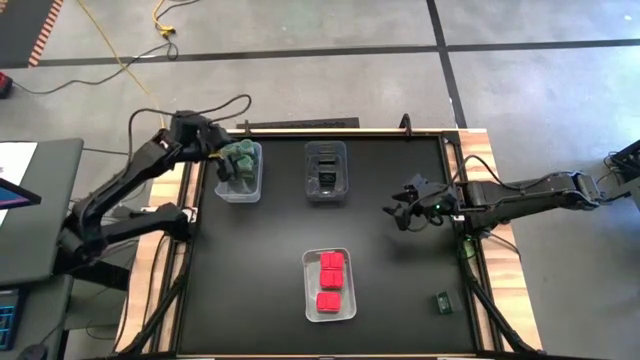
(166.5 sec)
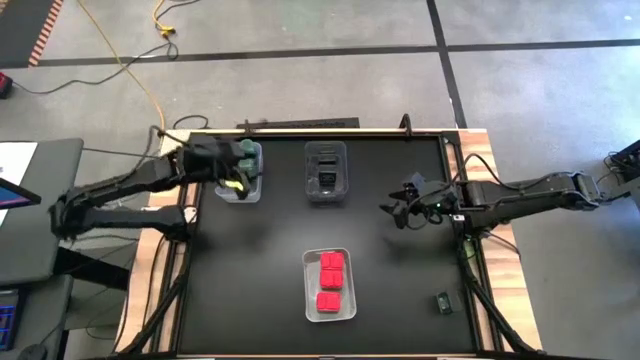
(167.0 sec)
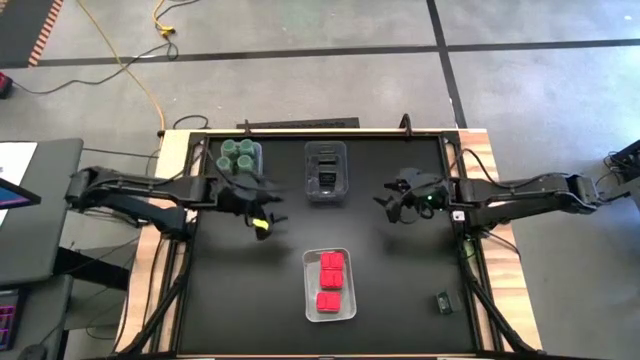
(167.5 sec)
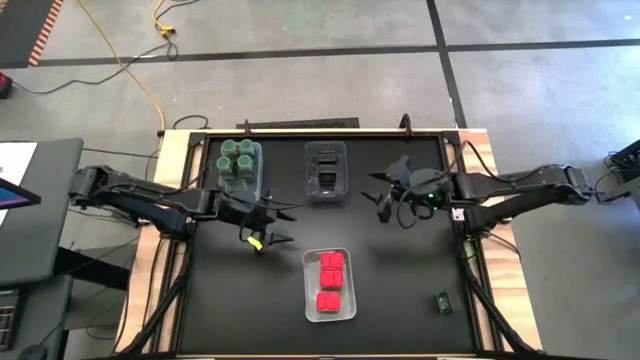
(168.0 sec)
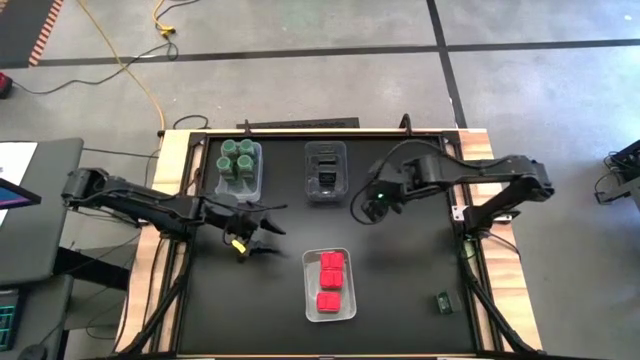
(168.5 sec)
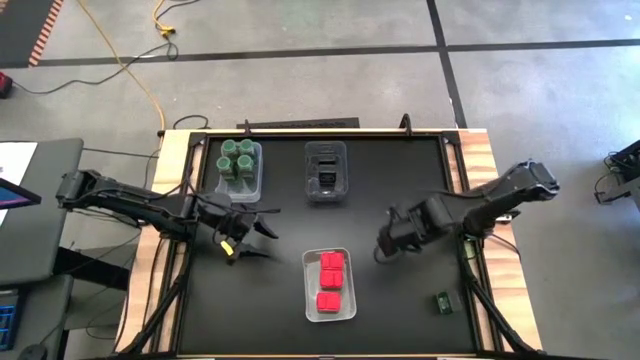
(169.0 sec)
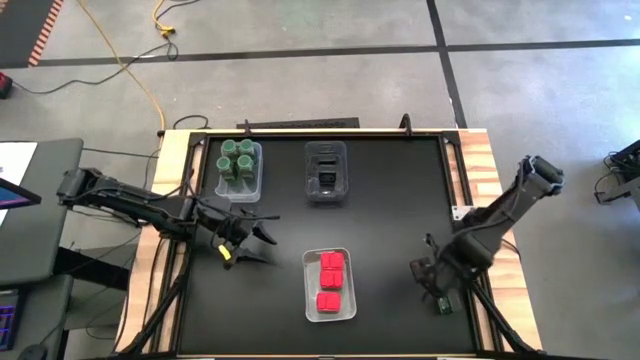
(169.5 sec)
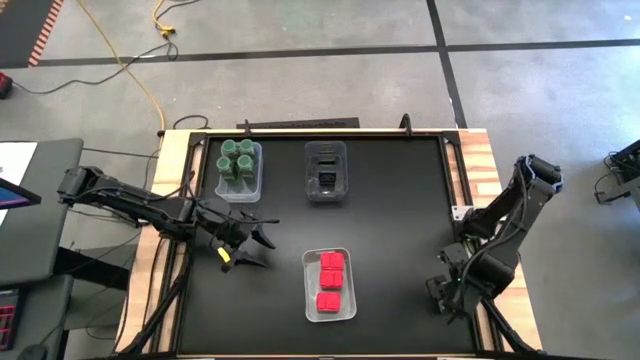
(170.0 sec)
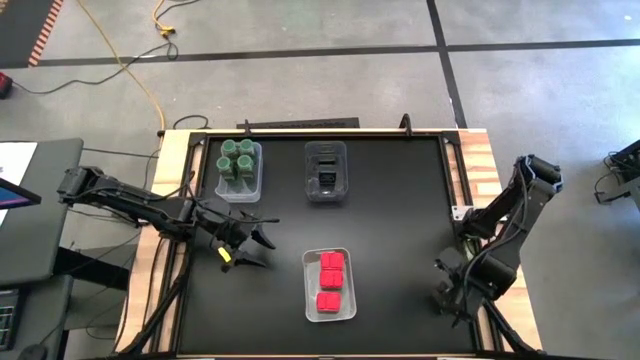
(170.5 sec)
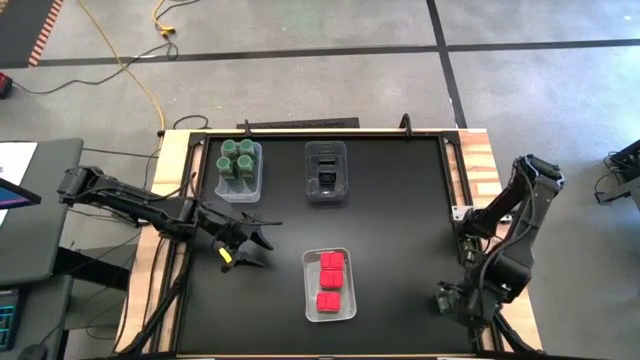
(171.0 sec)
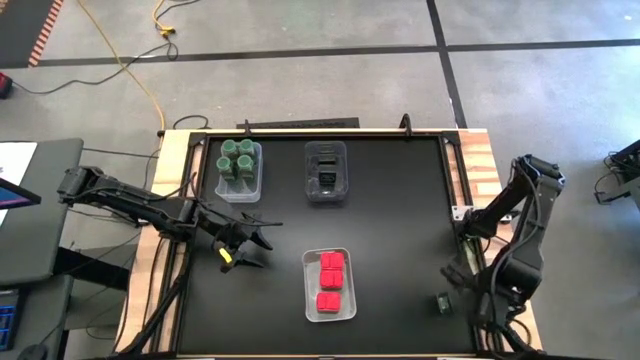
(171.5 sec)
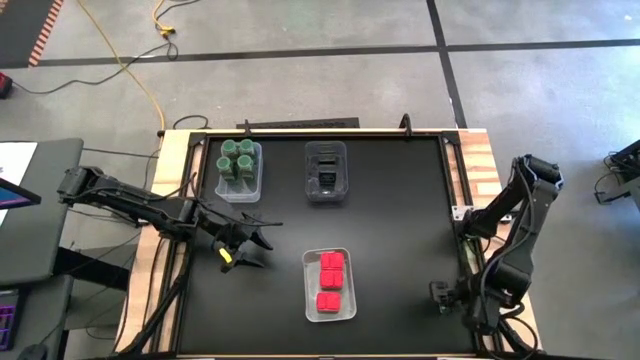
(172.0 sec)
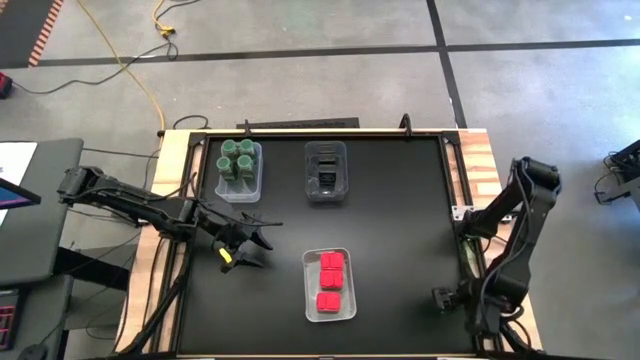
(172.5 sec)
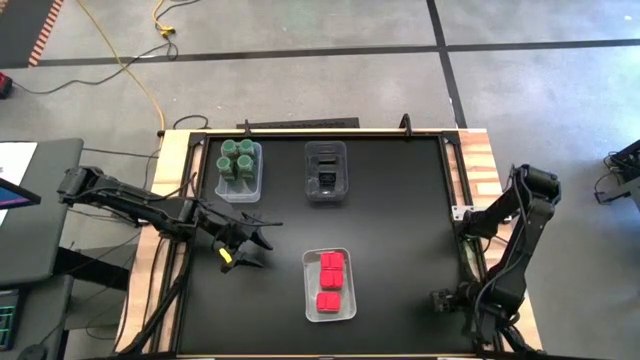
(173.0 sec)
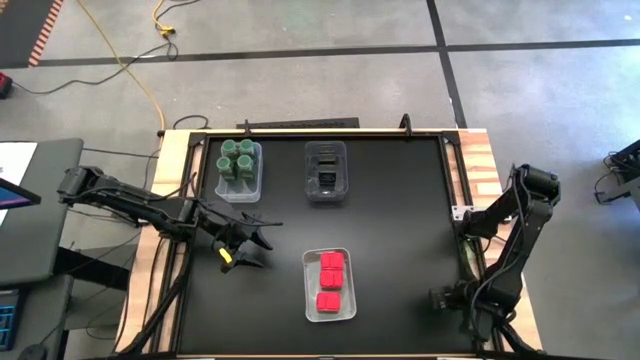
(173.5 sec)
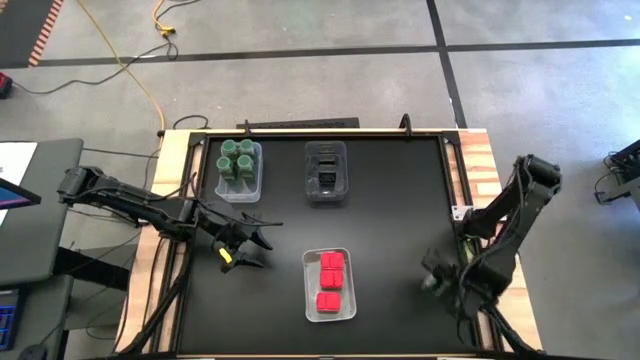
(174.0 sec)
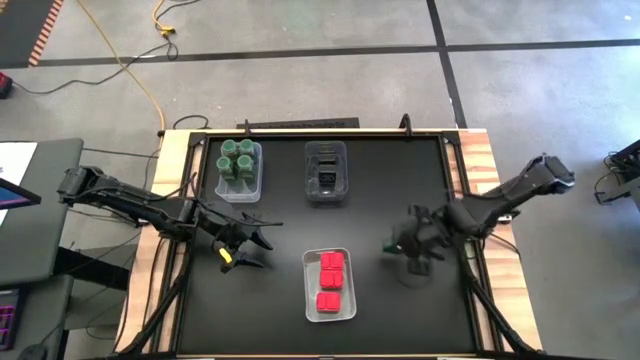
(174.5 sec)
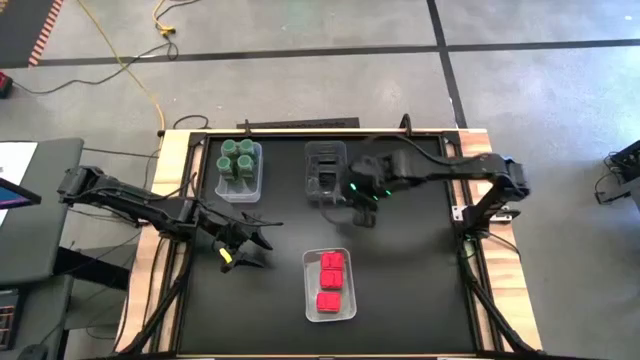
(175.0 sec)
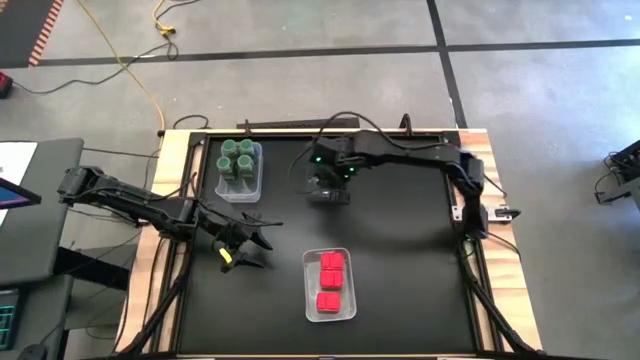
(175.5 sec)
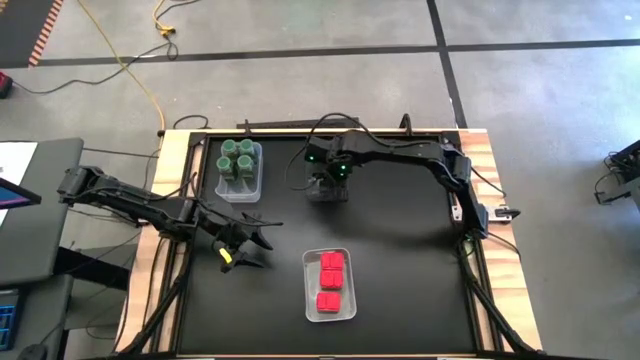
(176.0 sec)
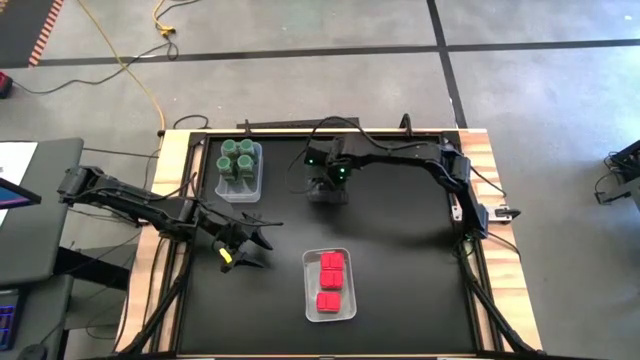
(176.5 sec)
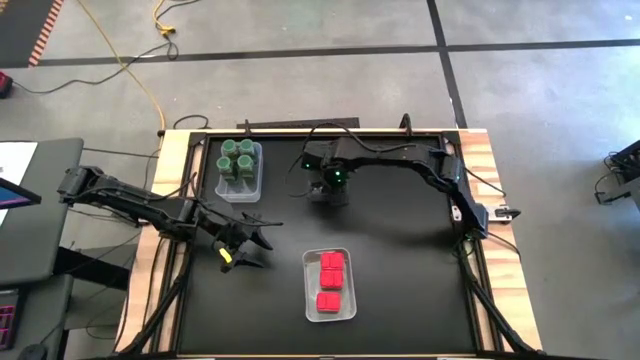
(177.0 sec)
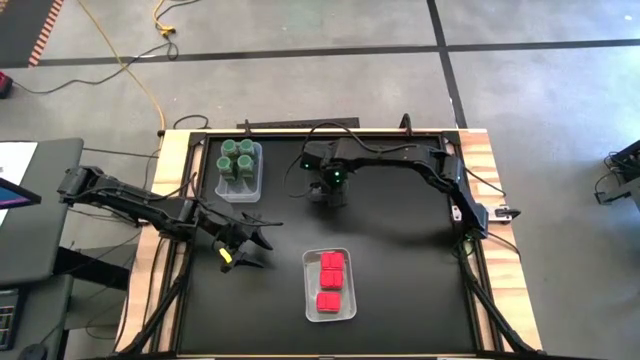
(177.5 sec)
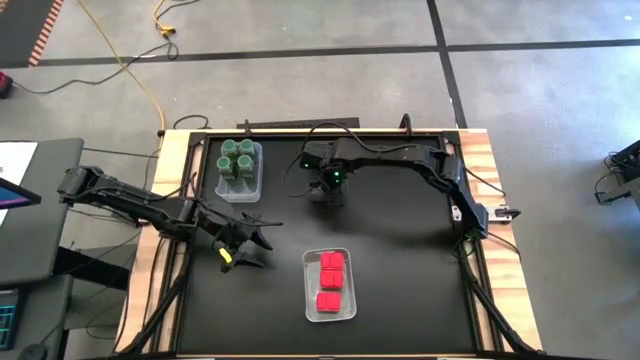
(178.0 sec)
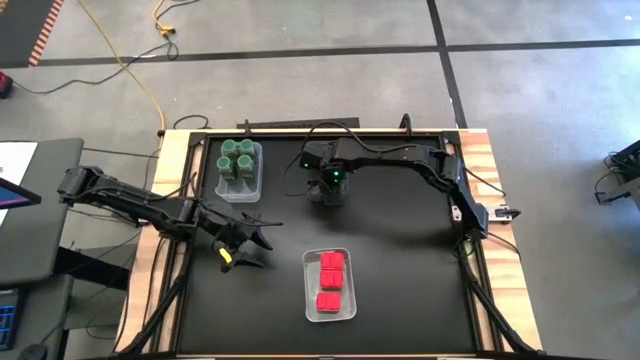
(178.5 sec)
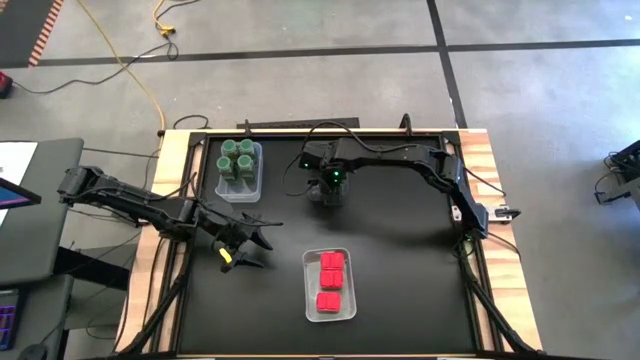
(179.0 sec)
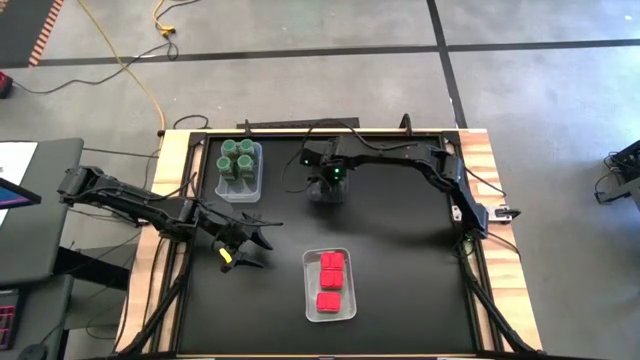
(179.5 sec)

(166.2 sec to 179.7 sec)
Task: Sort spices by type
Put the black seasoning can into the black bin

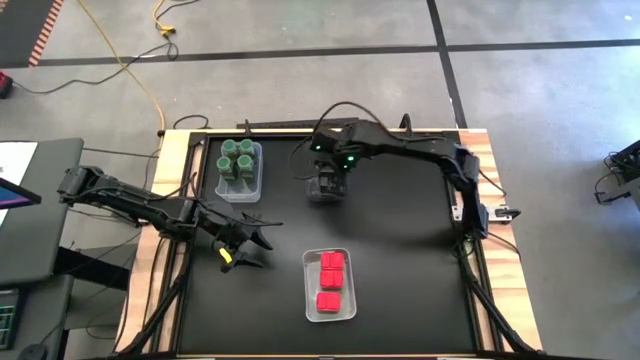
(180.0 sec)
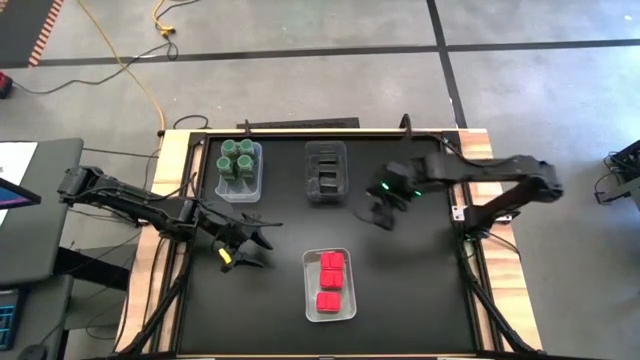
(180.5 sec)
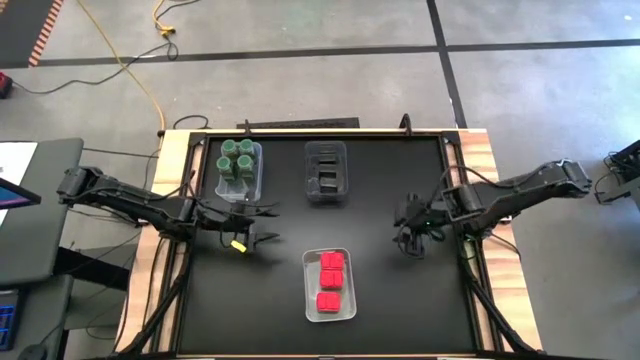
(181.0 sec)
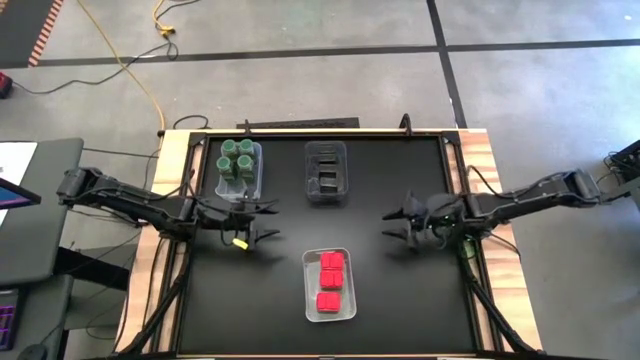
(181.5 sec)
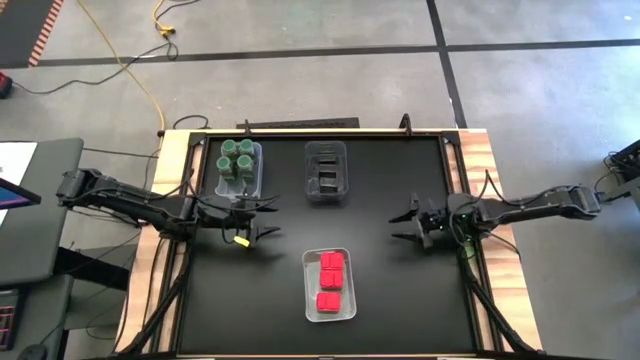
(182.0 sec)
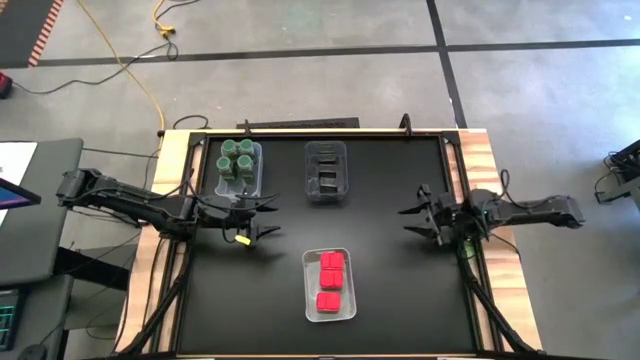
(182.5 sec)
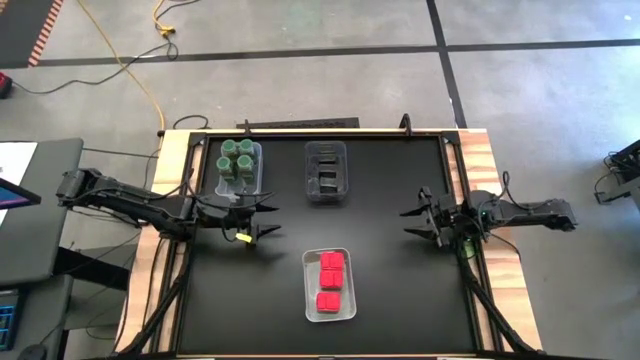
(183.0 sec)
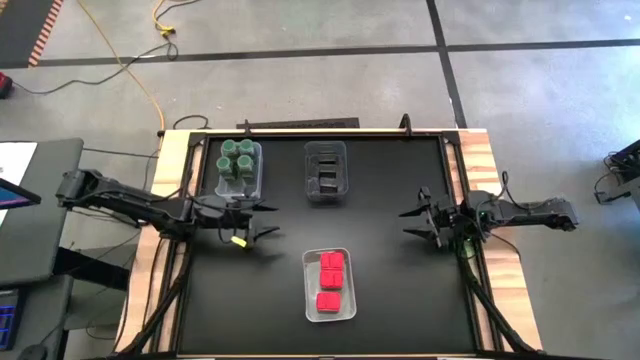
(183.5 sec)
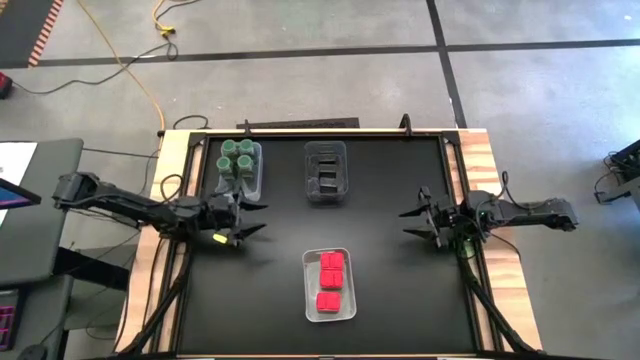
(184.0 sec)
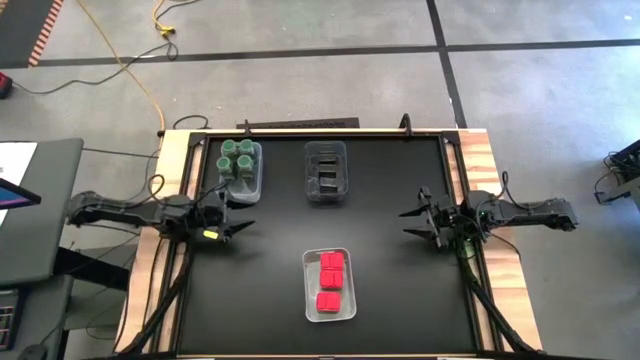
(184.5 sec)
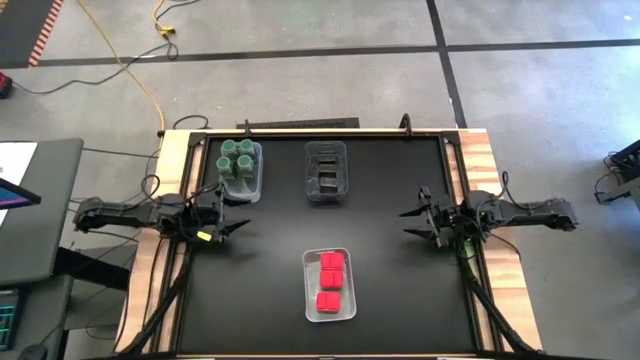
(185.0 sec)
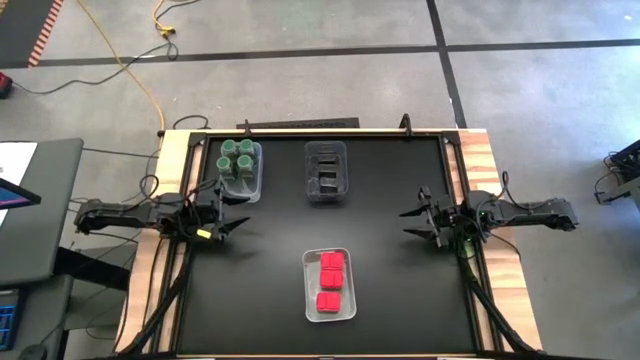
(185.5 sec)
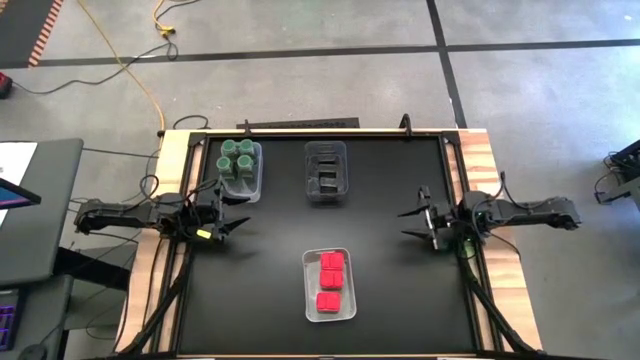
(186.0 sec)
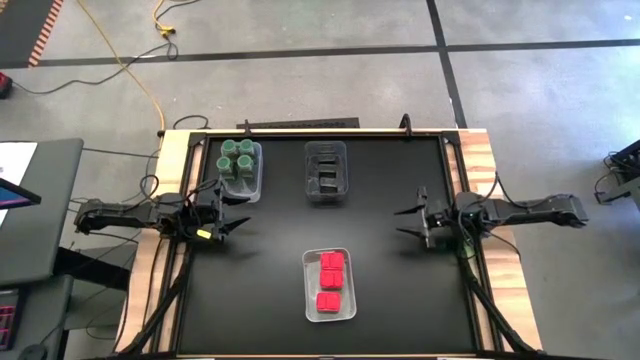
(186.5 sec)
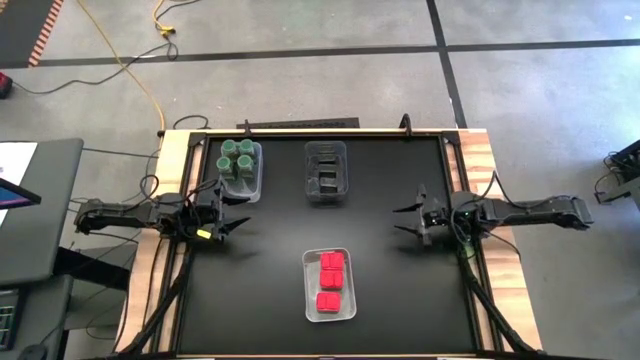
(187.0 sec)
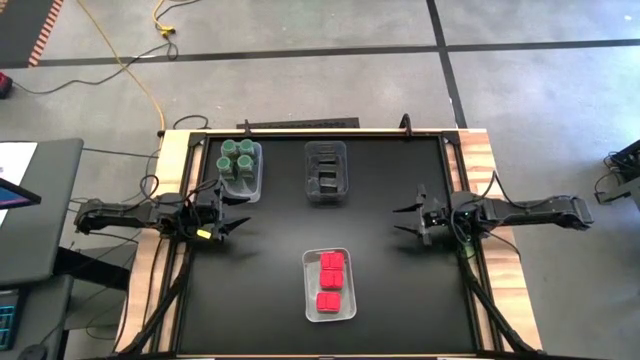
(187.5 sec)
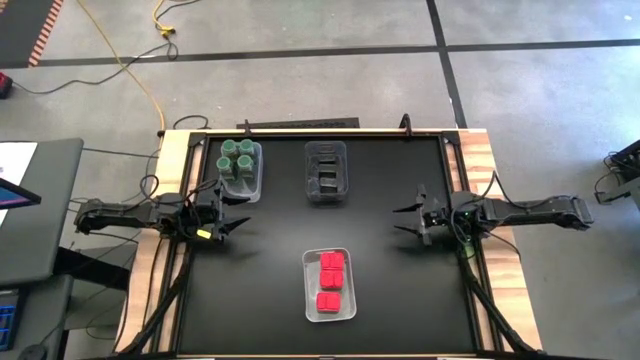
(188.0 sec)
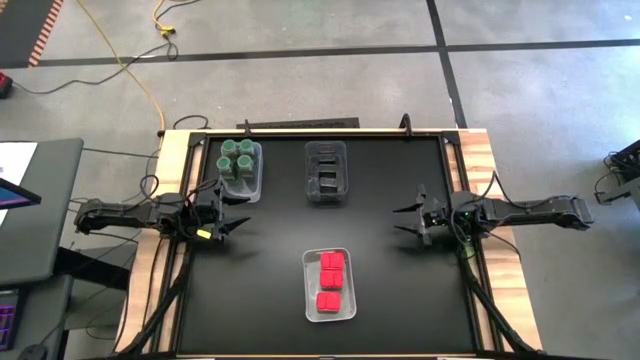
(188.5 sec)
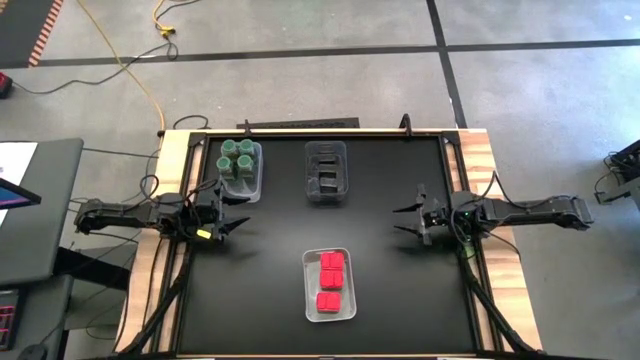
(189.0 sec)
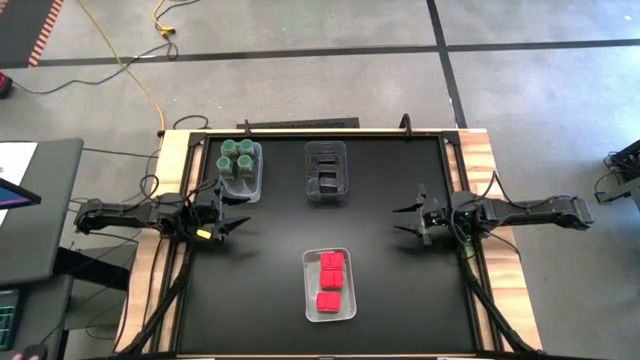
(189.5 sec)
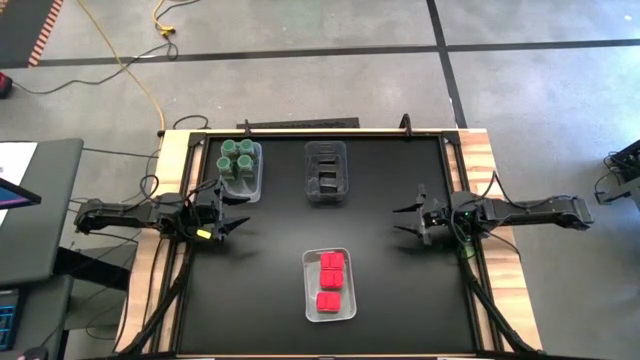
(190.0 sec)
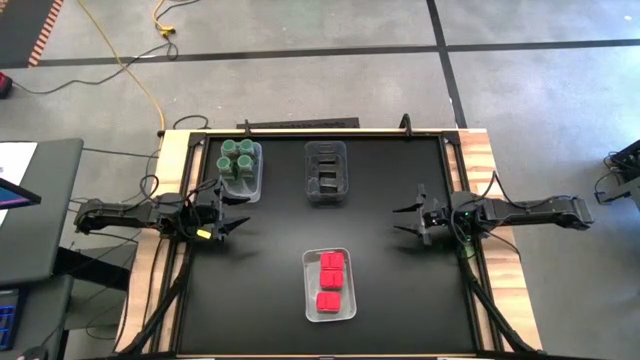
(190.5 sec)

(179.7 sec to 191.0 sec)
Return to Home Position
